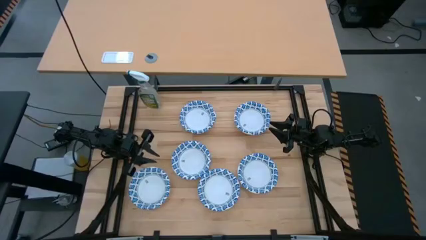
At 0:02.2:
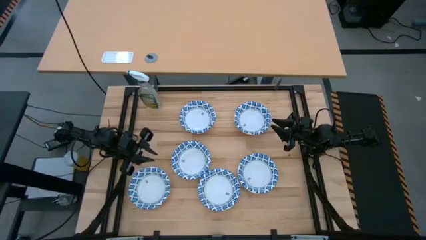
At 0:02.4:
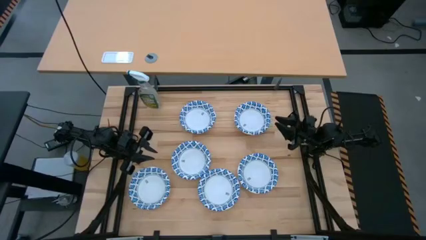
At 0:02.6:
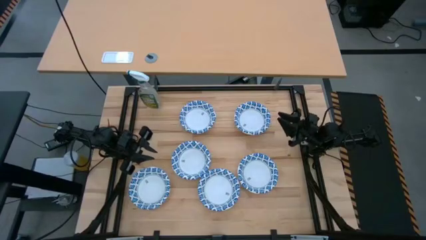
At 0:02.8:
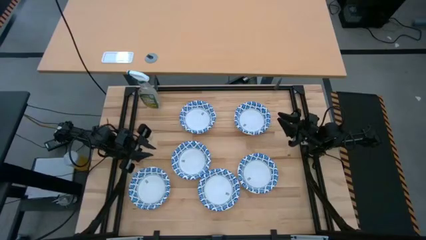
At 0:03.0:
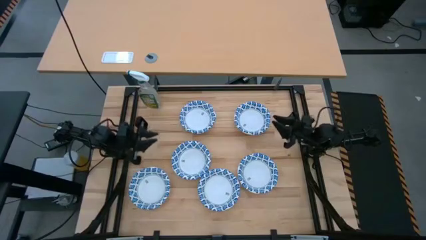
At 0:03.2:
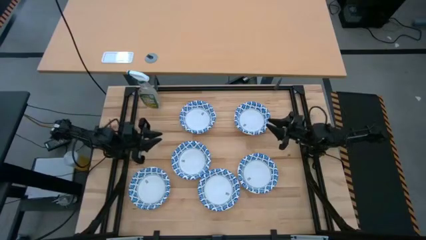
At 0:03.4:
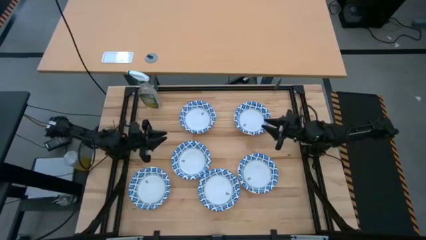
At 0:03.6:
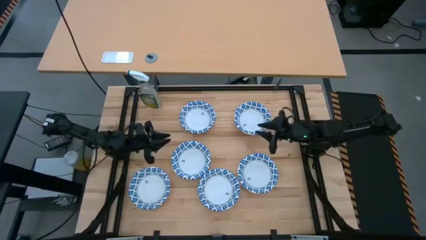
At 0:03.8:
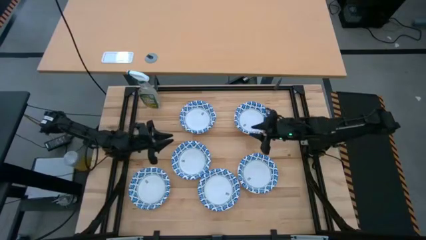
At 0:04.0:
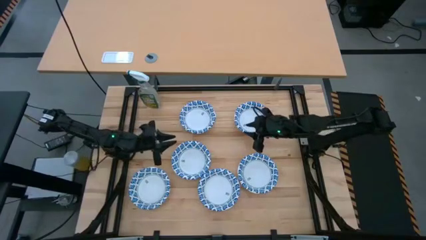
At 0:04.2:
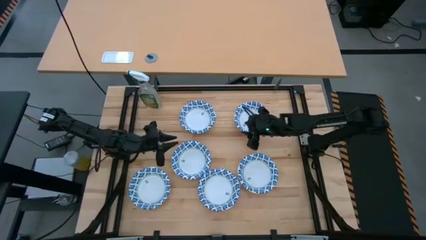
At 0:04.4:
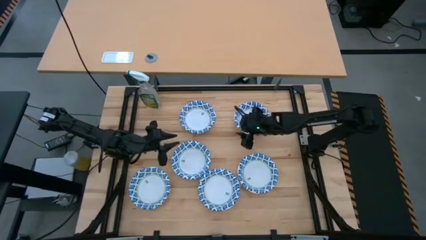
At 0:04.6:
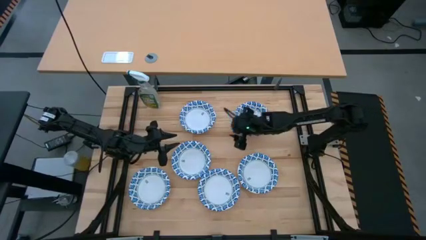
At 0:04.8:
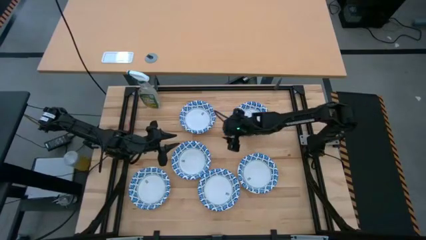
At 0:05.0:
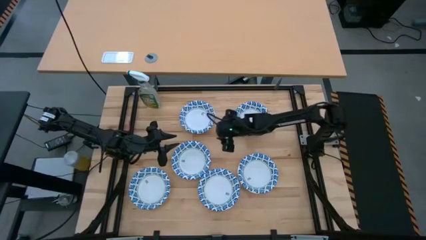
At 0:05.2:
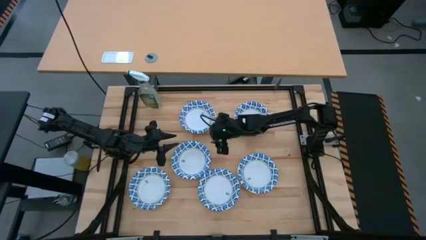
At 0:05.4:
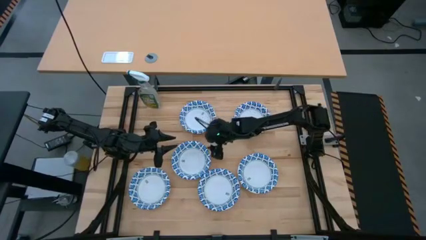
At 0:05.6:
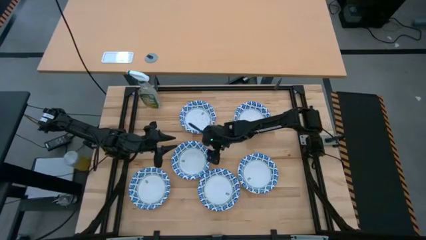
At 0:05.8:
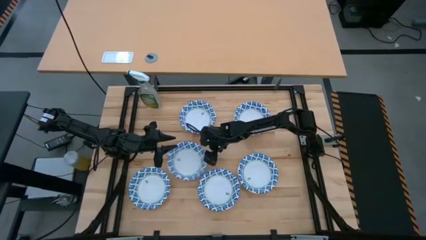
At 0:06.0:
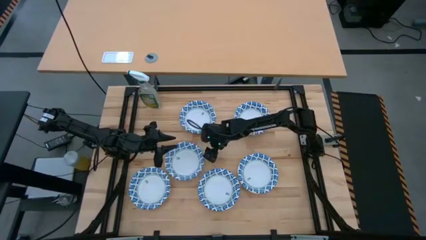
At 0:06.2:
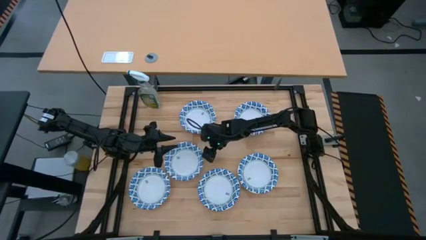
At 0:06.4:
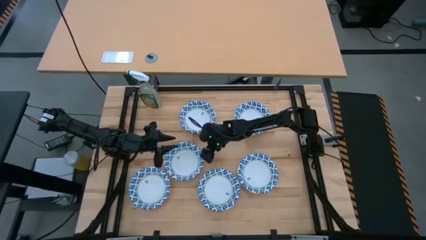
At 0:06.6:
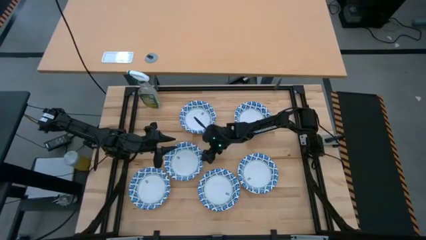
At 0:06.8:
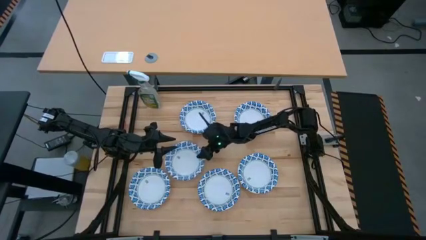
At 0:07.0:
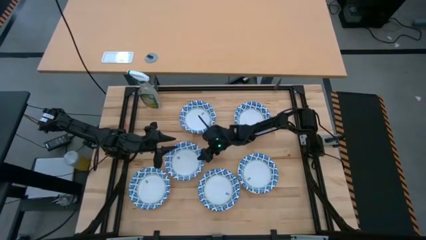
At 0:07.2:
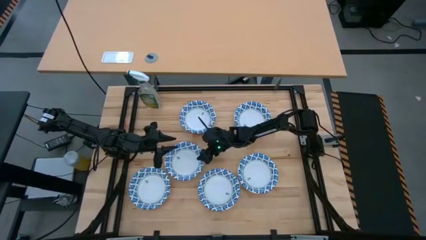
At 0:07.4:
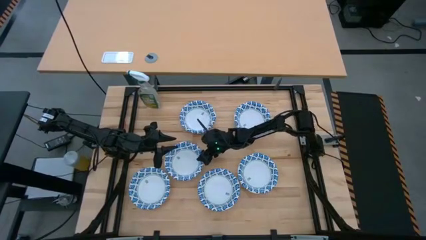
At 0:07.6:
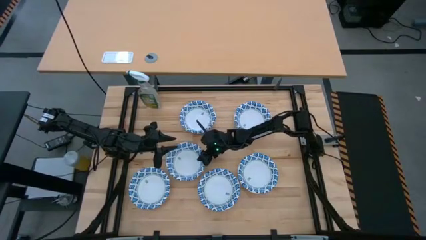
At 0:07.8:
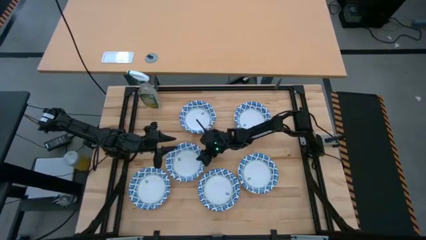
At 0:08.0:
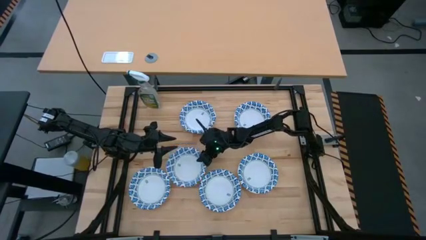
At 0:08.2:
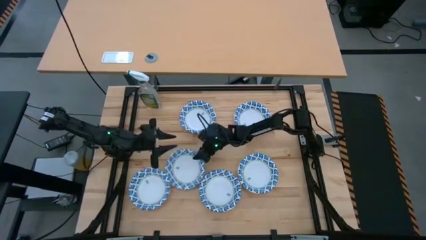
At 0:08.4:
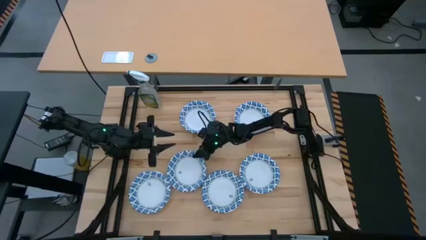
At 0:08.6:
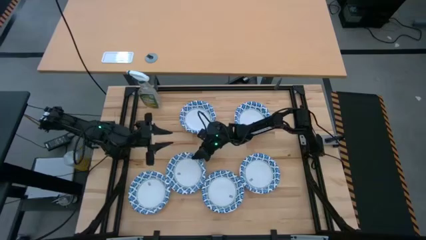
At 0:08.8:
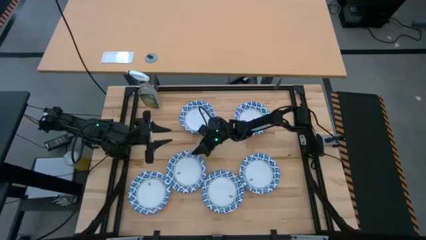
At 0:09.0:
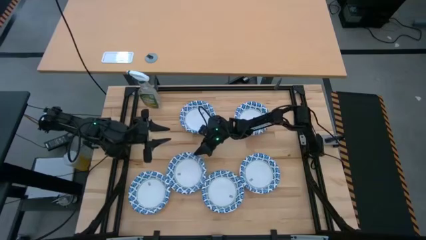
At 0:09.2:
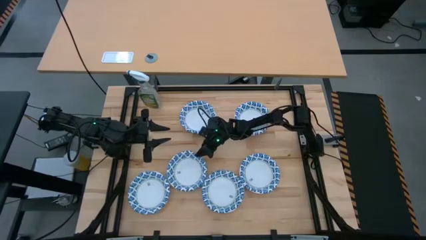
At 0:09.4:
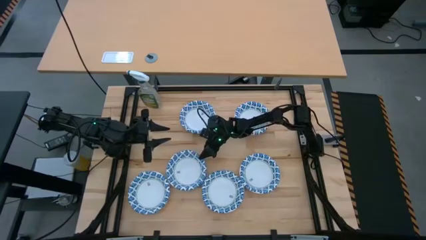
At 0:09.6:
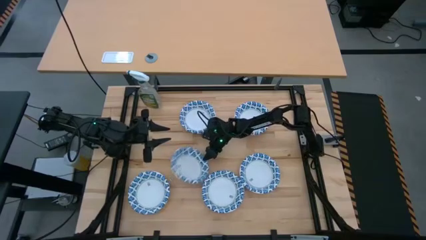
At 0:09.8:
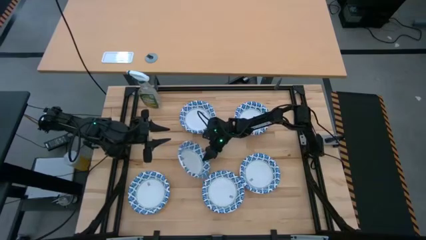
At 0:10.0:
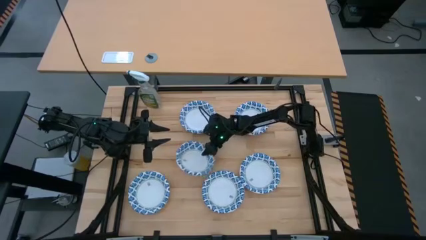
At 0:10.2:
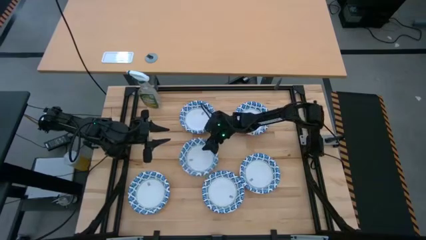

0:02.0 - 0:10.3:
Stack the blue patterned bowl on top of the blue patterned bowl

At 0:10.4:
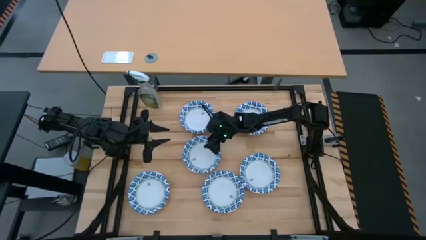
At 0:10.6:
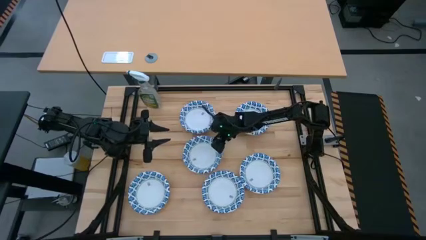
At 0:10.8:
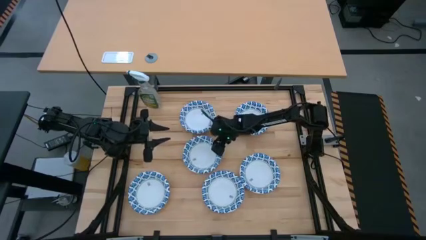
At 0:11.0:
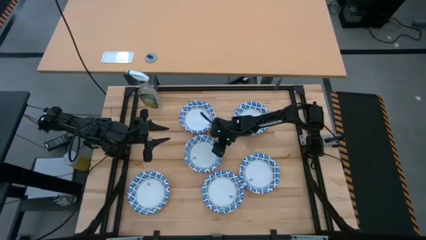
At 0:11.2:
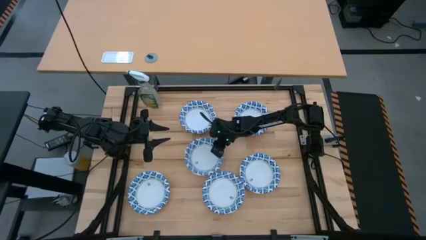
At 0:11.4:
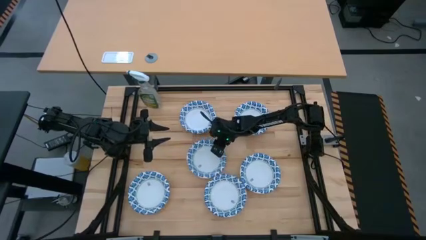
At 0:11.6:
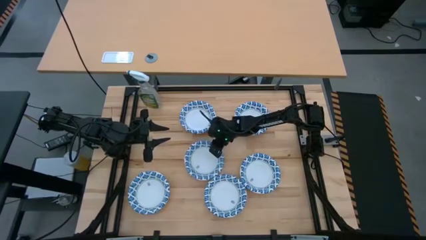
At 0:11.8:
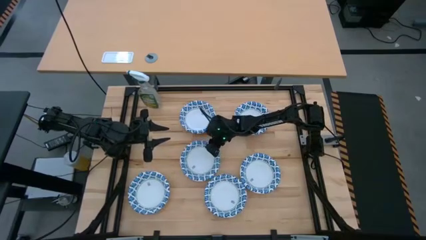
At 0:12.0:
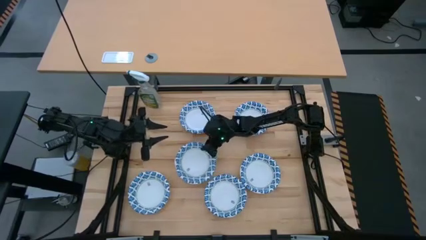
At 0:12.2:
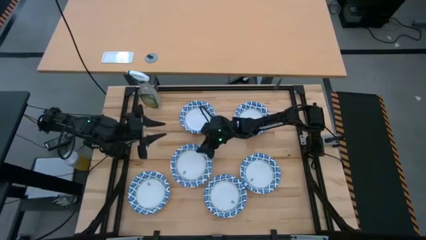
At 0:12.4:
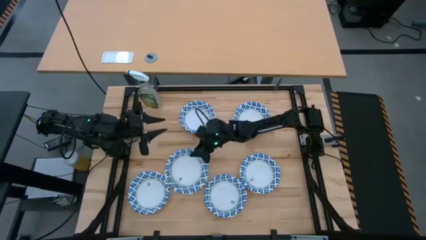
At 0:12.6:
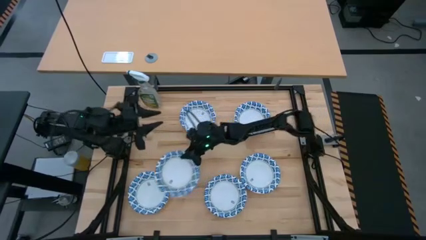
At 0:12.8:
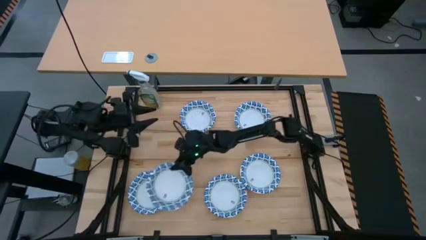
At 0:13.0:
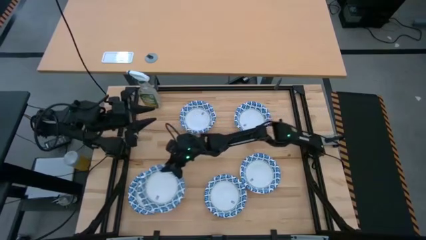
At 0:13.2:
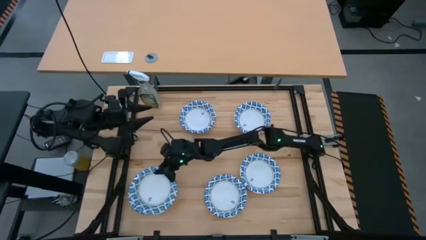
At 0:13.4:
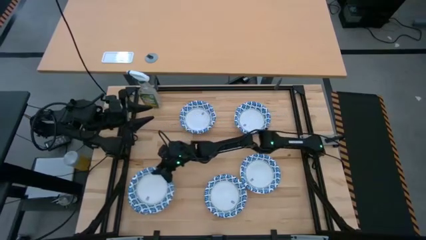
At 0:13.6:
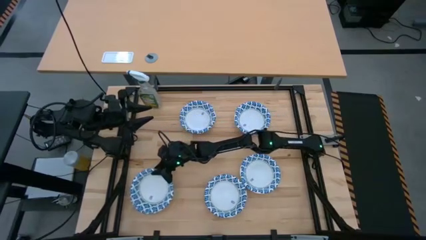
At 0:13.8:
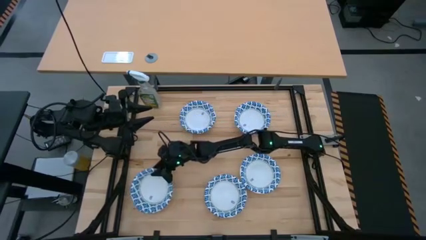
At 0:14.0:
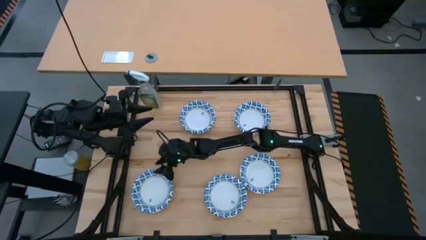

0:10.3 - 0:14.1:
Stack the blue patterned bowl on top of the blue patterned bowl

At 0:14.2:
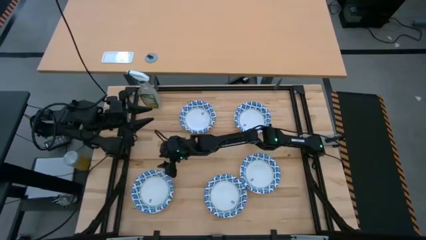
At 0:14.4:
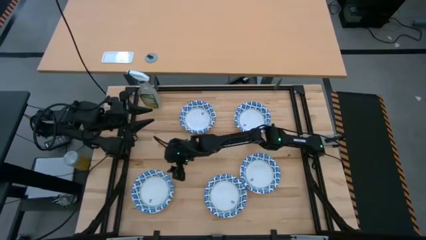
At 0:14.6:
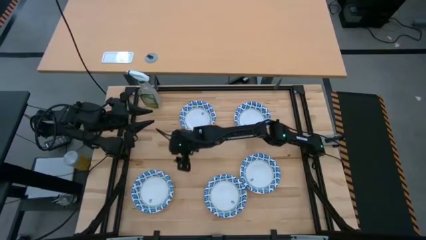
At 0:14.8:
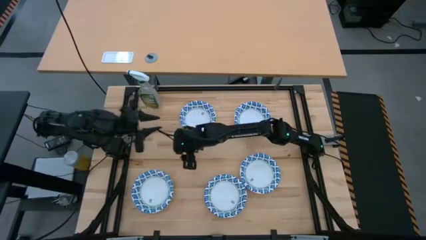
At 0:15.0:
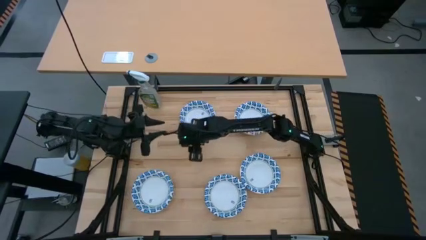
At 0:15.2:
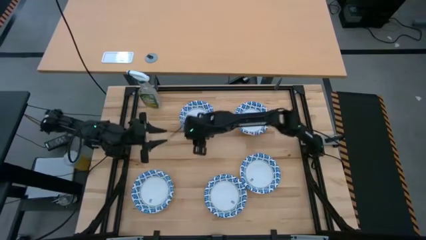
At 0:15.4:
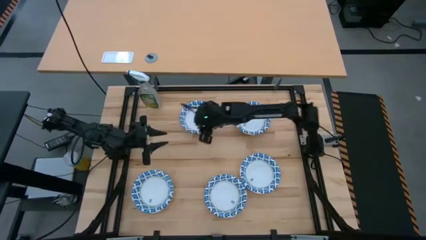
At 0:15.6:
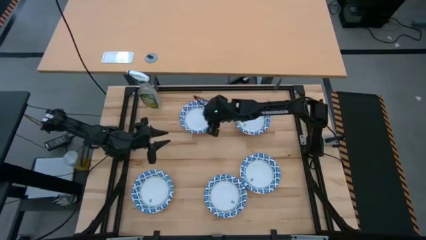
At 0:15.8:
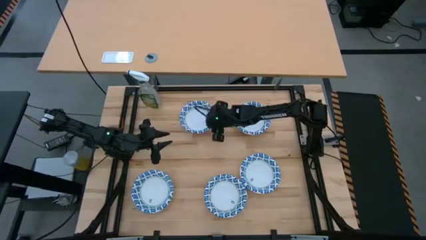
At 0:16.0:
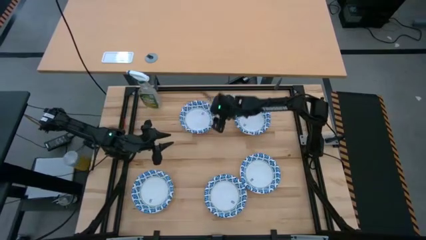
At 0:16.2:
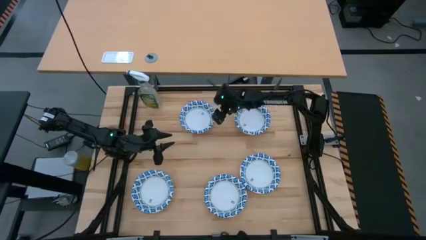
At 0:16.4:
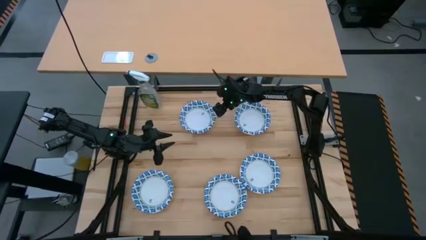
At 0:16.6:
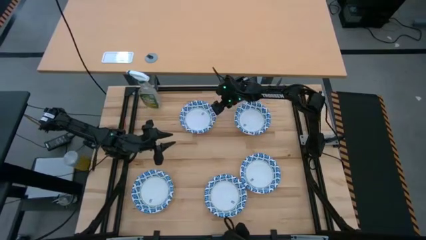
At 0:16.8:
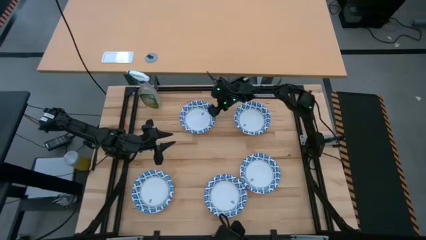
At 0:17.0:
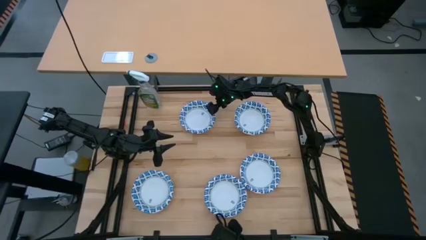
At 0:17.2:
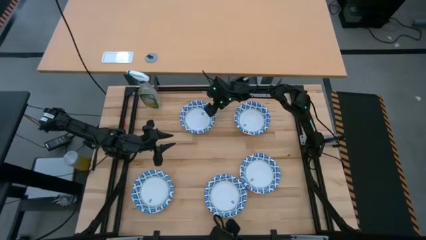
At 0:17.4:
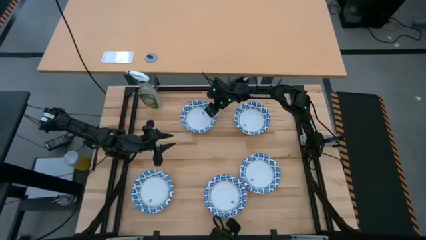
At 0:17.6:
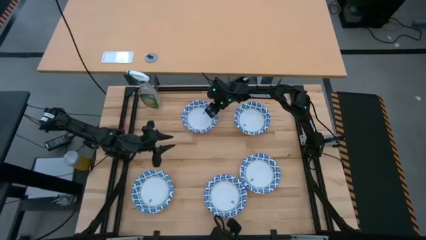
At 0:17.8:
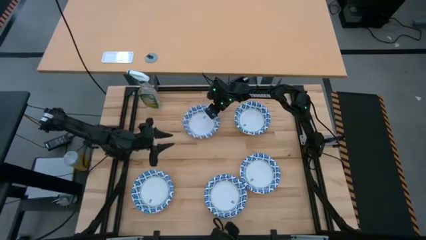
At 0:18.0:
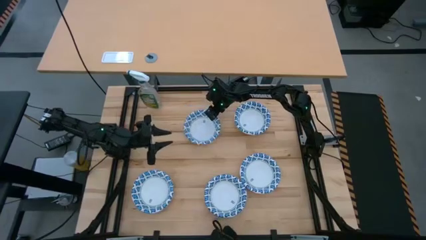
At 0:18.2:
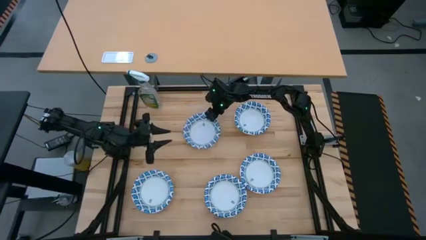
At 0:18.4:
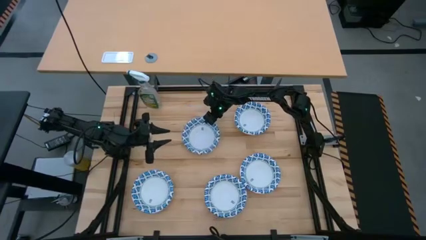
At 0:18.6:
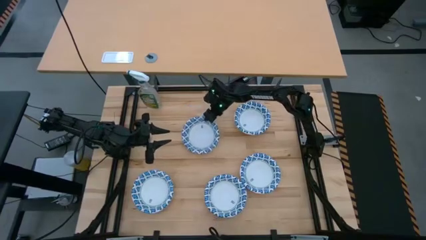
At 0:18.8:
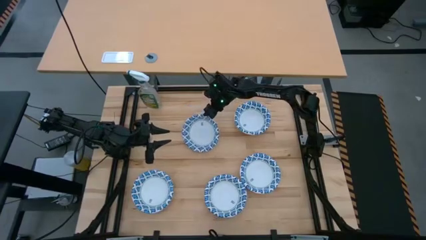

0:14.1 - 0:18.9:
Stack the blue patterned bowl on top of the blue patterned bowl
